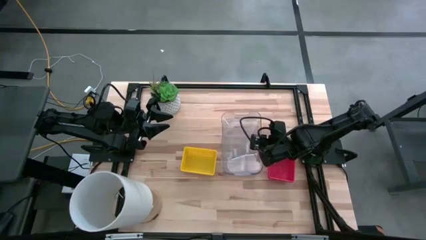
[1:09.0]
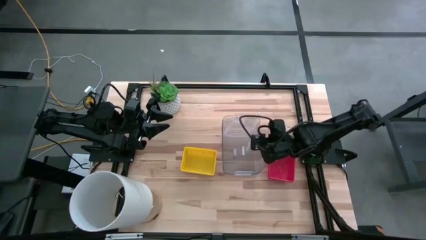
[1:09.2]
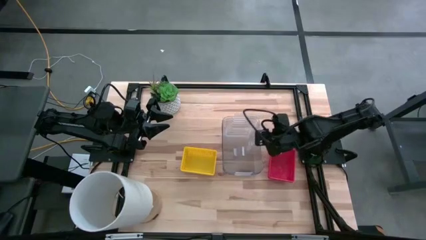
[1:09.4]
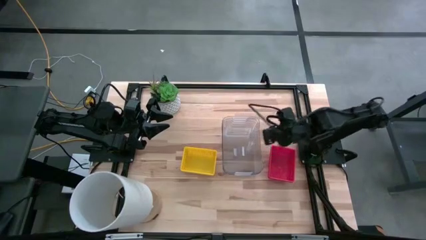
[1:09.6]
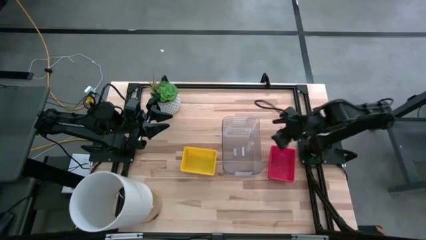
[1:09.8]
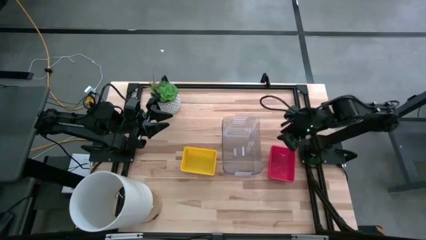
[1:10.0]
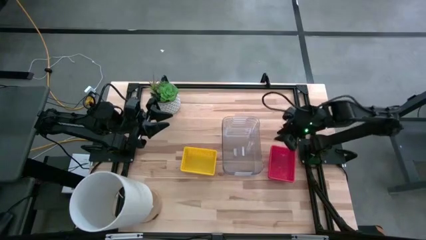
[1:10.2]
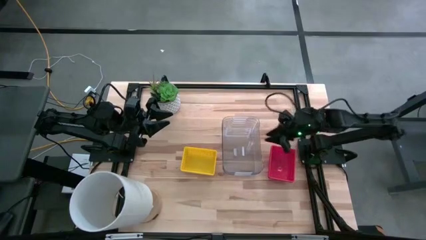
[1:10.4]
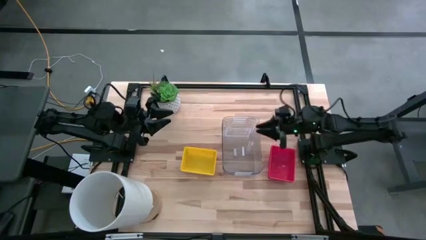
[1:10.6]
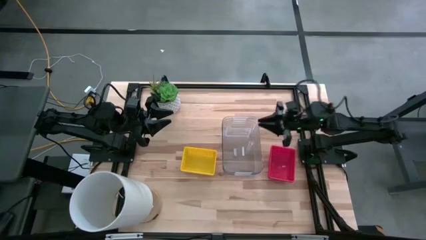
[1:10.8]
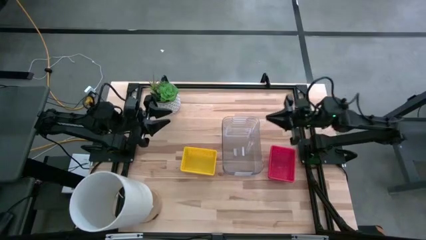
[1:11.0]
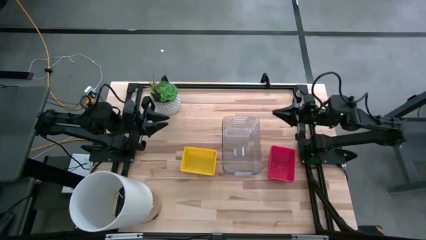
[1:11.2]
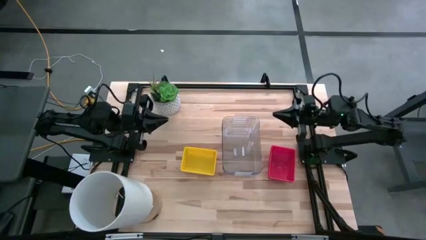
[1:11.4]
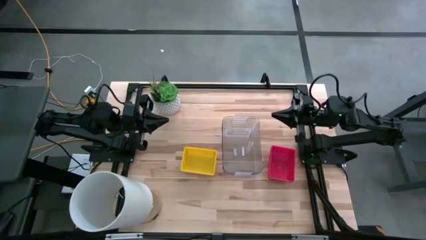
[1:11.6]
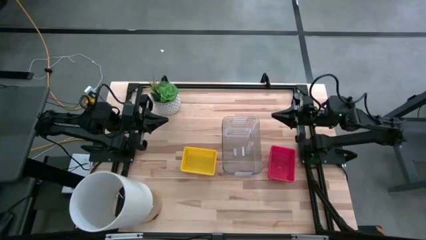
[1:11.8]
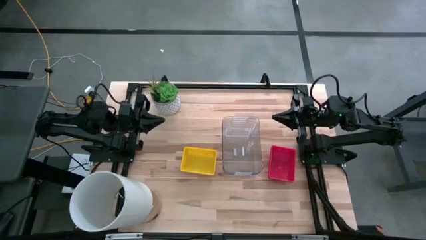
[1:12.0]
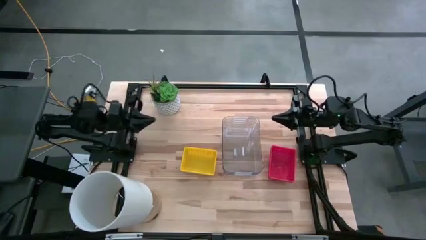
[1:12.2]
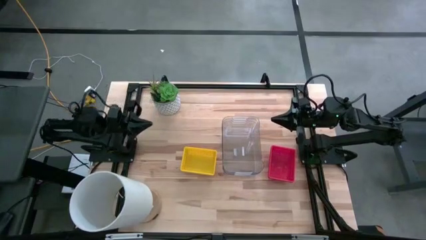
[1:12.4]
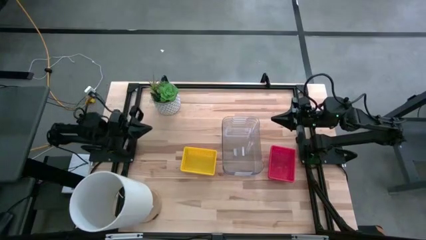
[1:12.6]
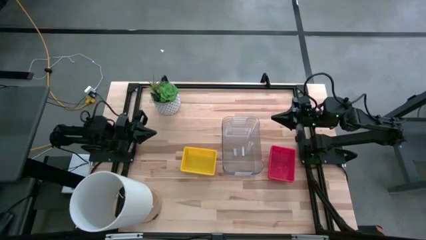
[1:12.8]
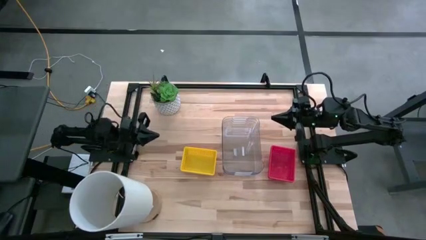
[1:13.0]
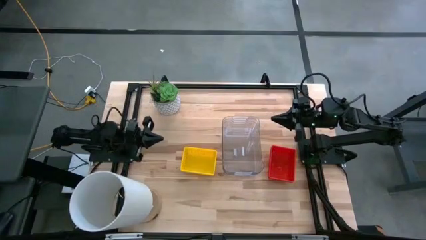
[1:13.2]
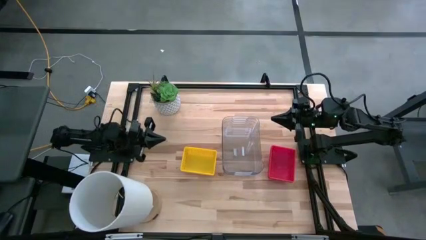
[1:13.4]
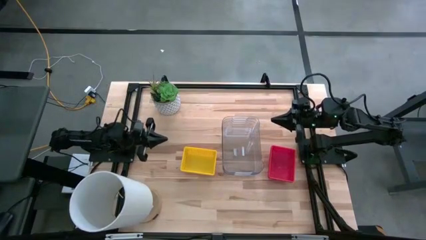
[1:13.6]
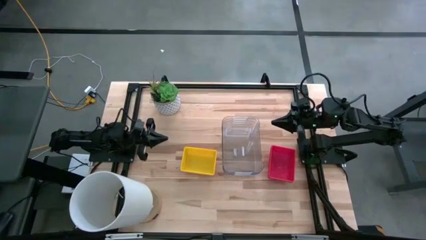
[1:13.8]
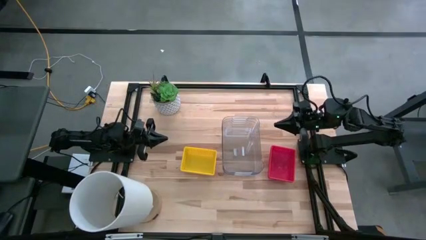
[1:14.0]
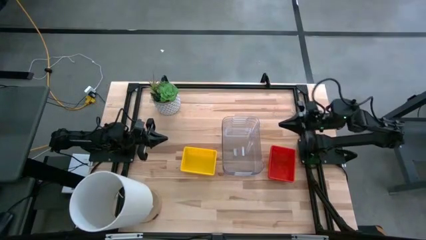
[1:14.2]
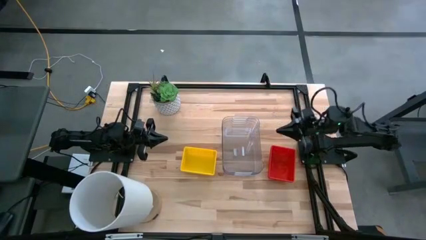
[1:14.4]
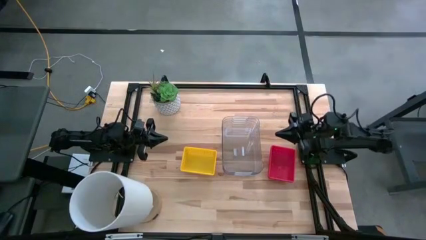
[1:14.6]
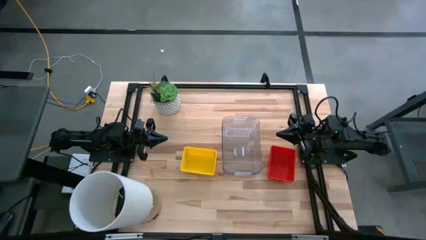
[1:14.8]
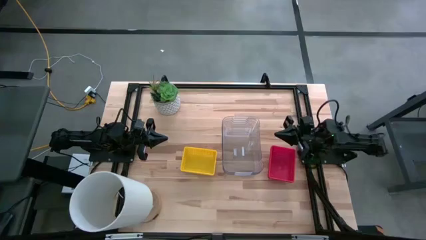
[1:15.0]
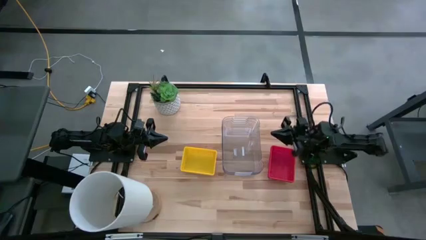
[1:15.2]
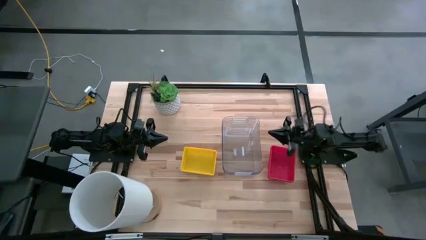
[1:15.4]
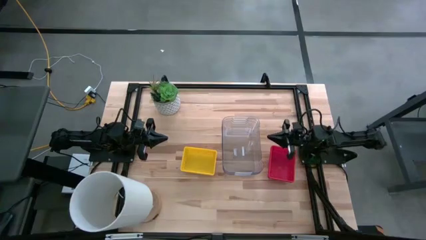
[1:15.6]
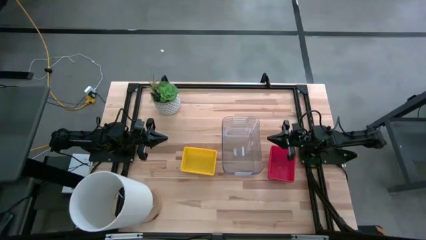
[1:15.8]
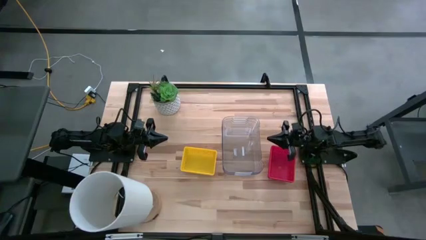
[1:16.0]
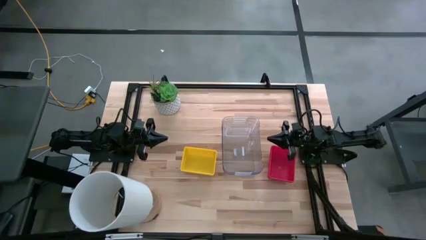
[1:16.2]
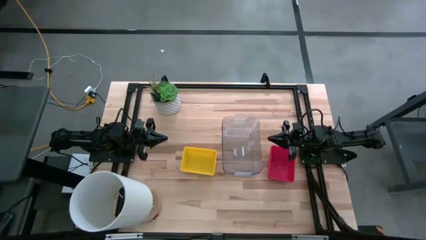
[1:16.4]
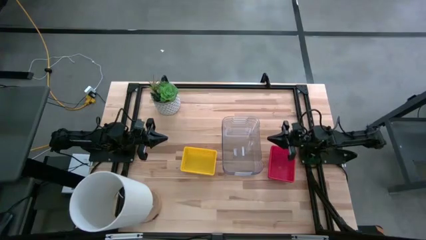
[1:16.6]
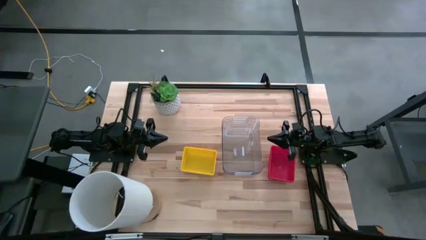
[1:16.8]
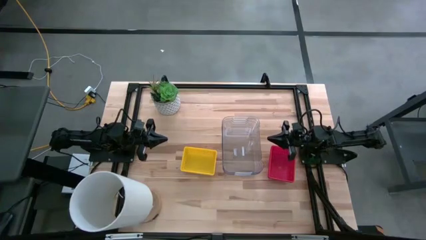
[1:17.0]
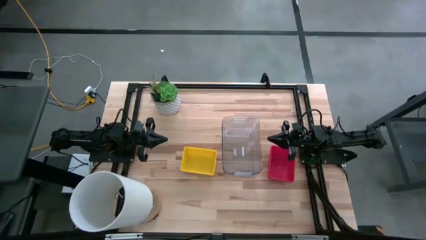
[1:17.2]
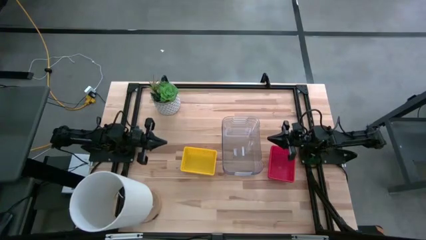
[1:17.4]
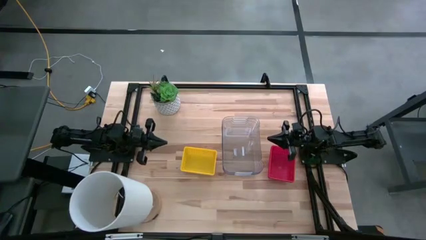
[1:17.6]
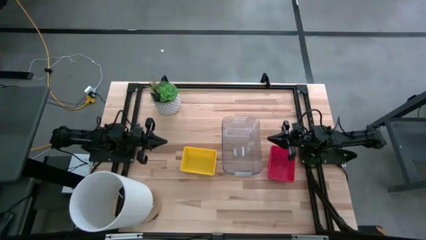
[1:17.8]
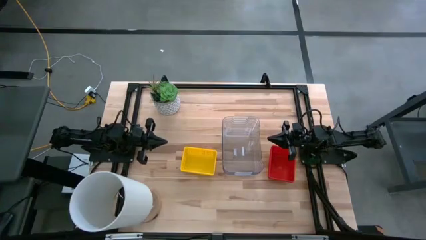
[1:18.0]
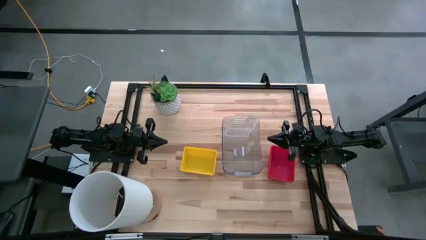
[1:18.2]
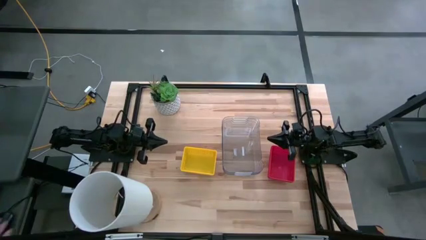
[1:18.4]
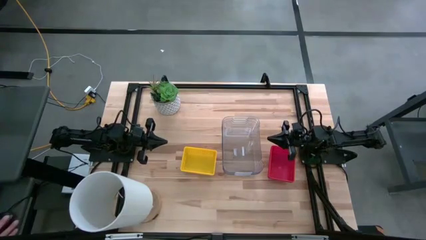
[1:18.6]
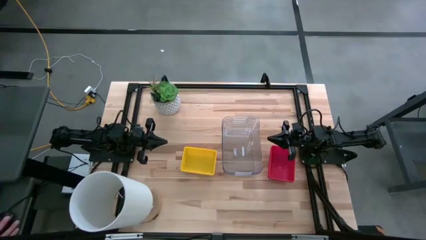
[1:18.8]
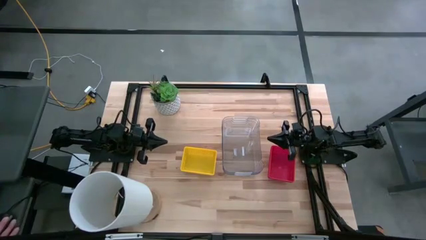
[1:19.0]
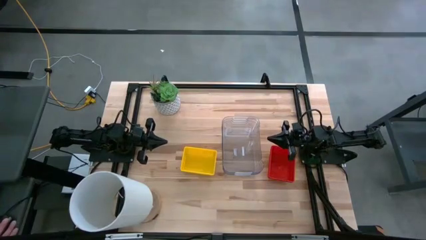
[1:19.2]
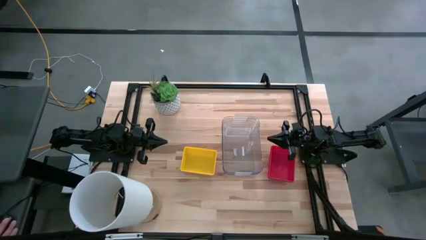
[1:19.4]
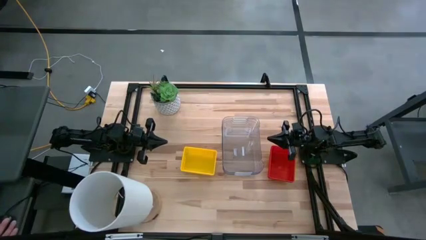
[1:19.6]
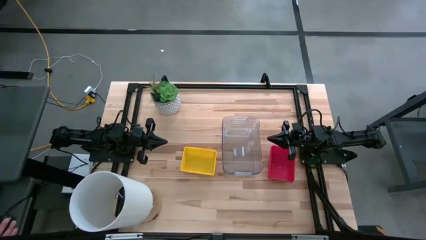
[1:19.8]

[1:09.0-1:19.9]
Return to Home Position
